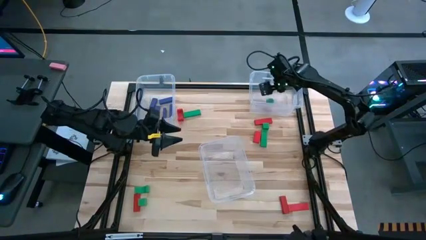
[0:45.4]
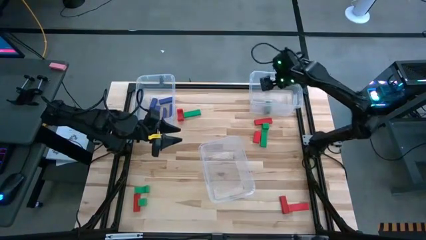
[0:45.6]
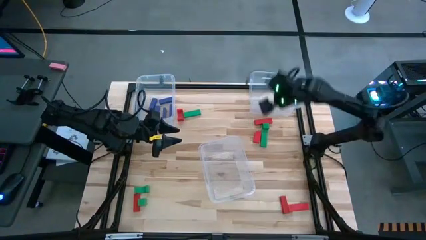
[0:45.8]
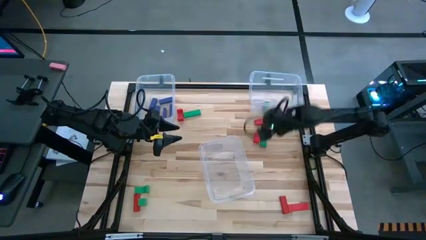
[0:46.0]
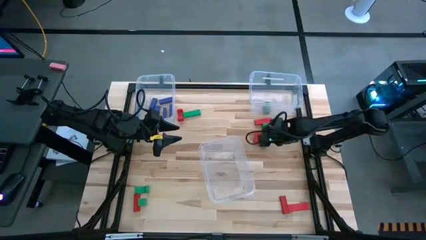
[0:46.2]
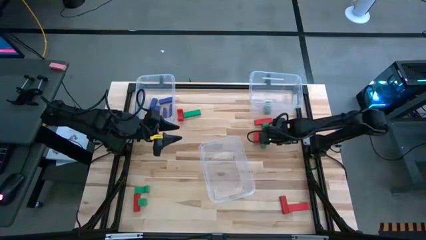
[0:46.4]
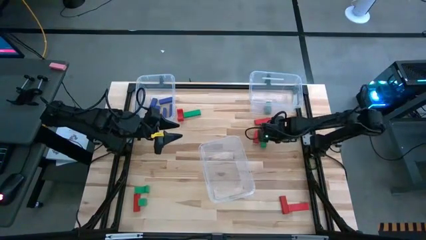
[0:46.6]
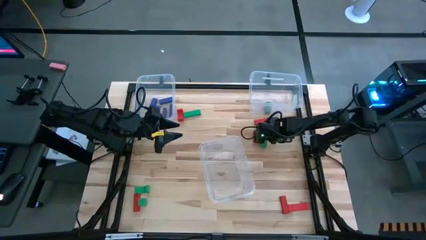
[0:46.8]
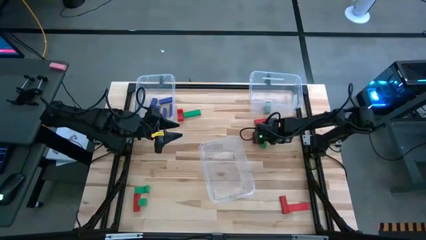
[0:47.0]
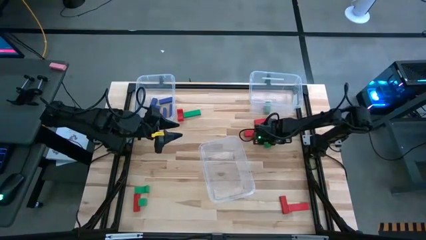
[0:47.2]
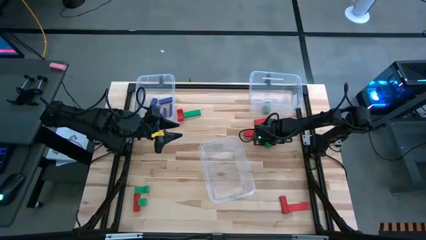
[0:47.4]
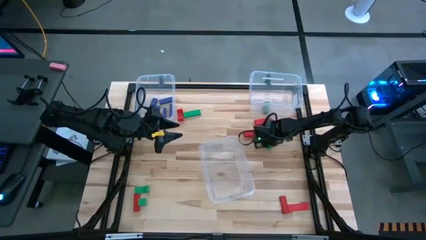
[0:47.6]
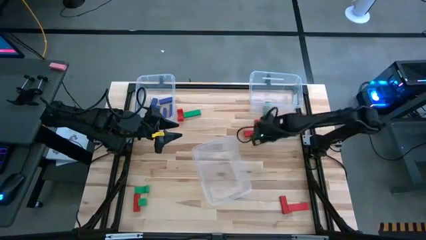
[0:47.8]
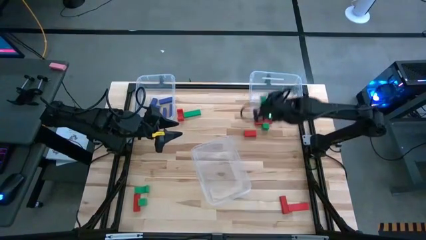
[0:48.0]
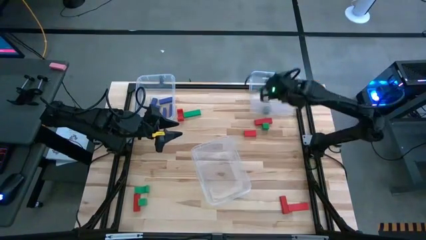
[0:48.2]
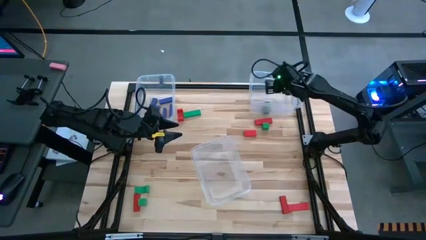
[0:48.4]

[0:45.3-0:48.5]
Task: Sort blocks
Put the green block into the top right transparent bin

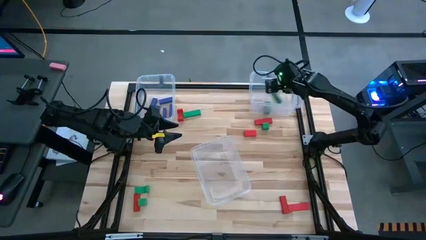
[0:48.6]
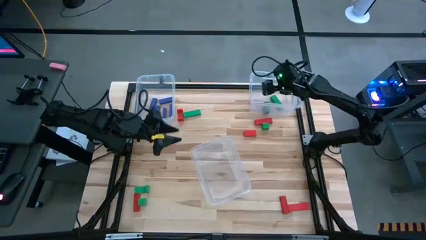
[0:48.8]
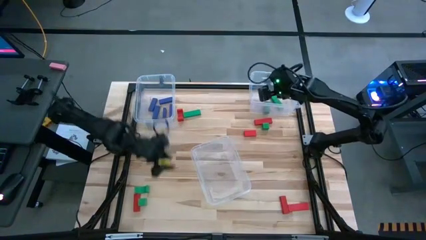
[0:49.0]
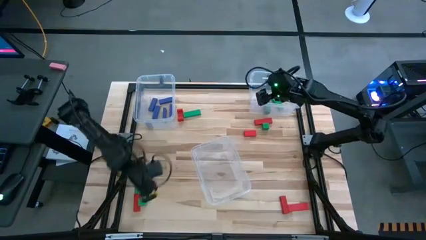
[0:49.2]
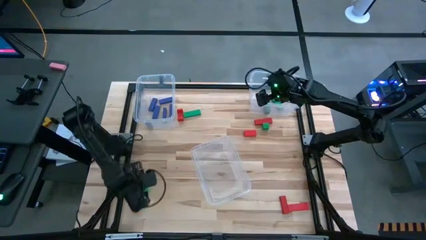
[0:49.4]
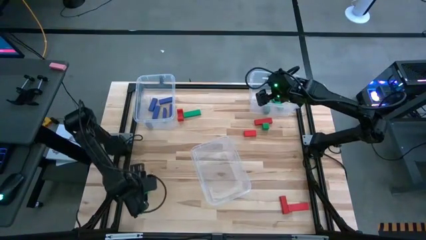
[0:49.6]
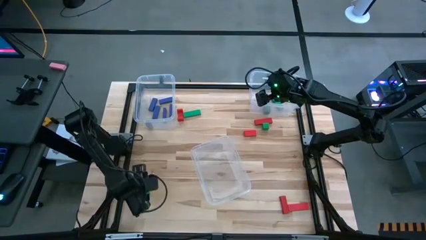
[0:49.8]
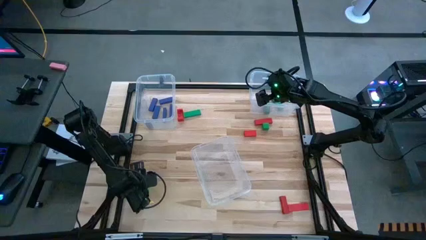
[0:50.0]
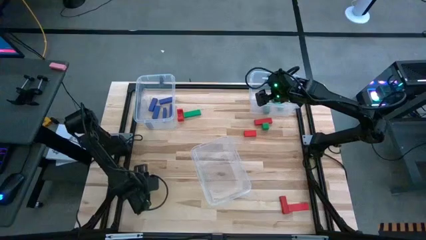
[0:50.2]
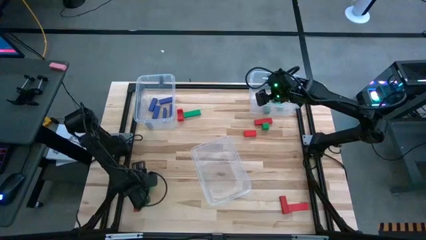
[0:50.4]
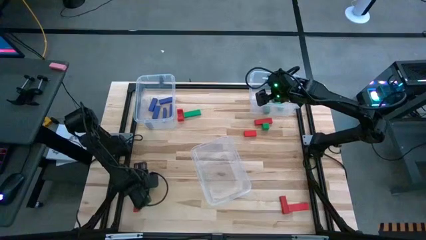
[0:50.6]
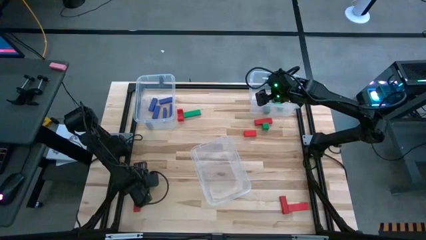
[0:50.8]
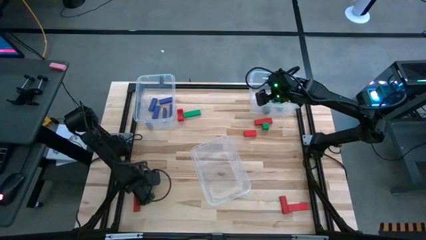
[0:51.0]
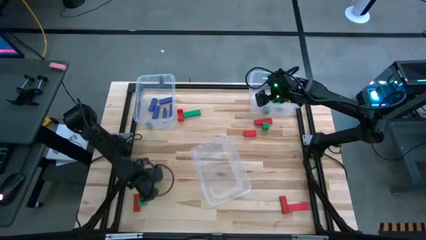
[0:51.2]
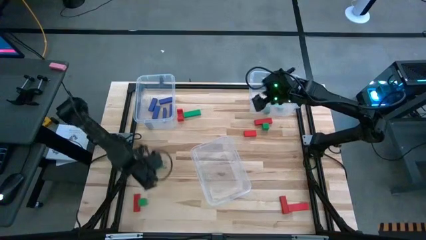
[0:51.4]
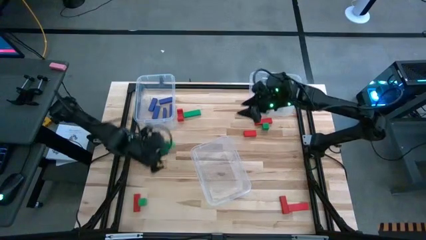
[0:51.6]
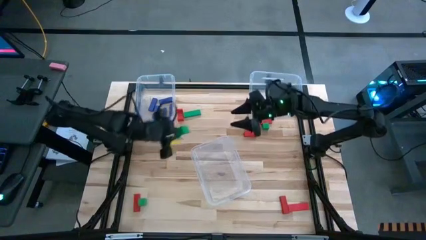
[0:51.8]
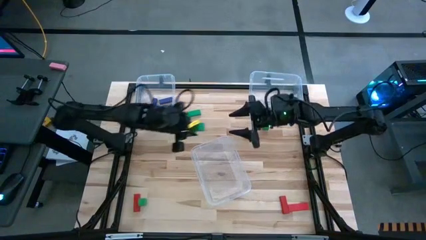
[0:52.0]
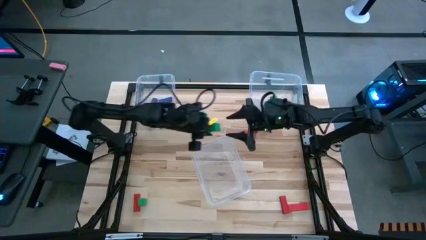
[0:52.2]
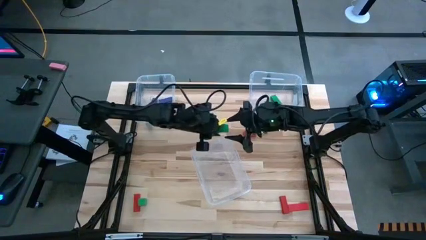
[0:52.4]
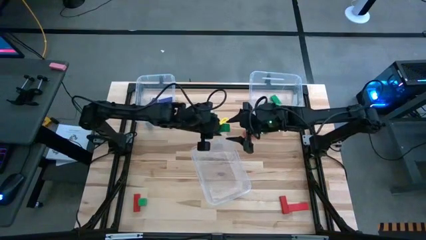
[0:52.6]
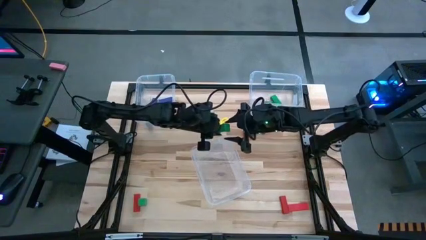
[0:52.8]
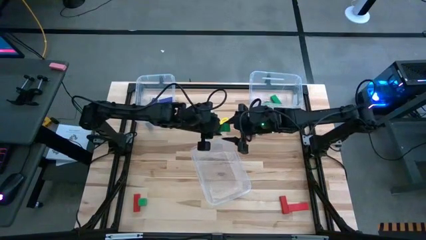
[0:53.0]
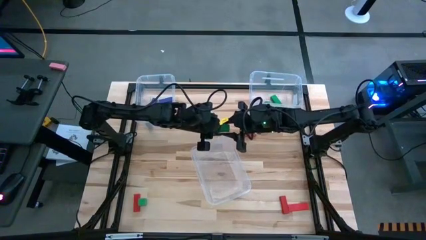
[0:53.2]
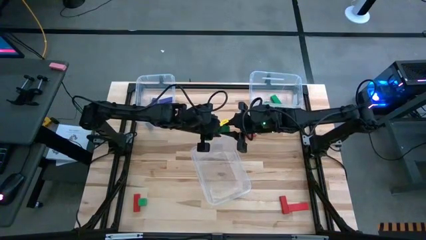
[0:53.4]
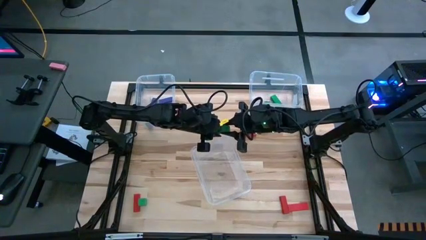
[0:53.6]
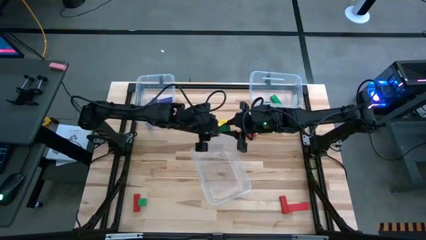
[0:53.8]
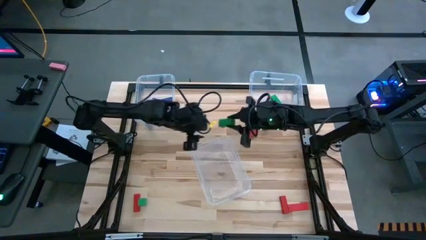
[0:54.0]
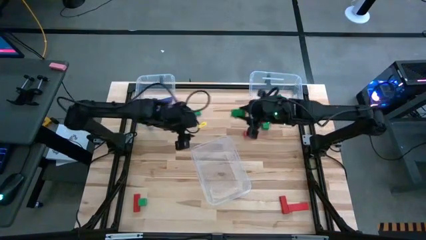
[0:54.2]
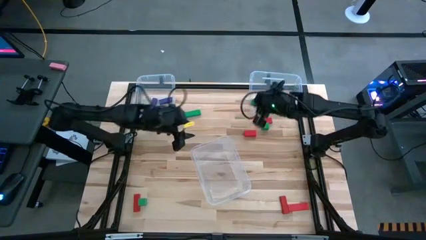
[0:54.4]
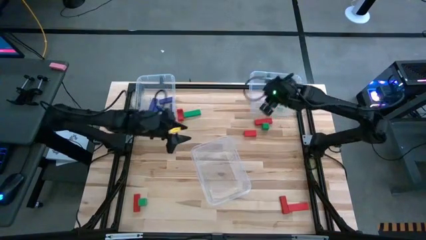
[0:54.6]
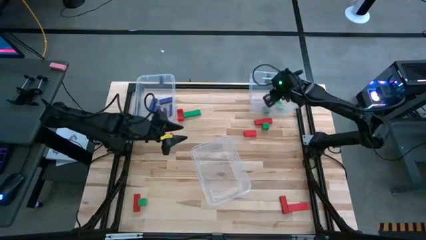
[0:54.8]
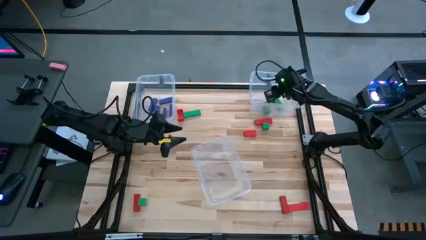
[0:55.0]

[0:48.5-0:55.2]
Put the green block into the top right transparent bin

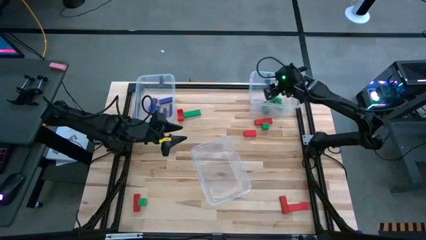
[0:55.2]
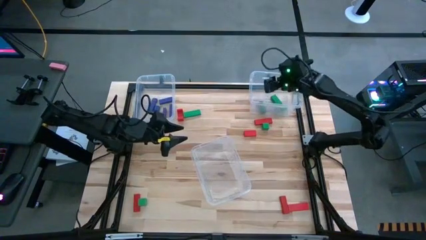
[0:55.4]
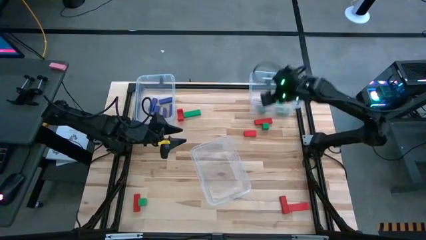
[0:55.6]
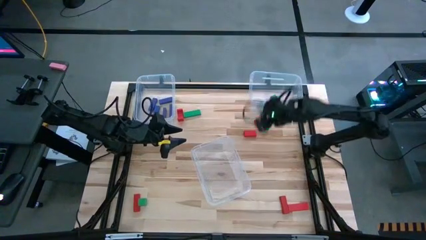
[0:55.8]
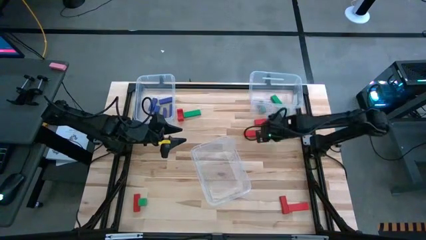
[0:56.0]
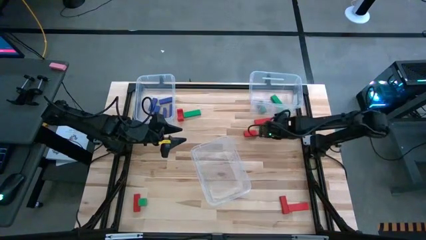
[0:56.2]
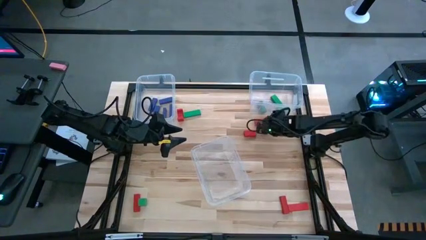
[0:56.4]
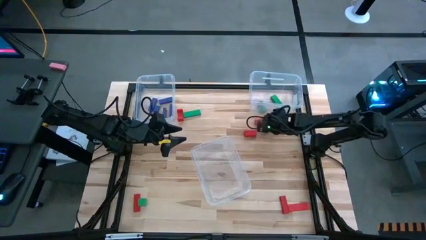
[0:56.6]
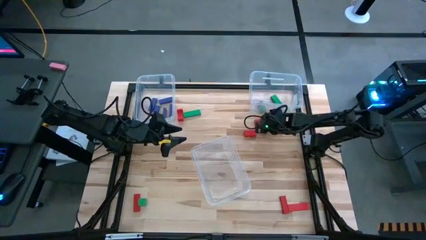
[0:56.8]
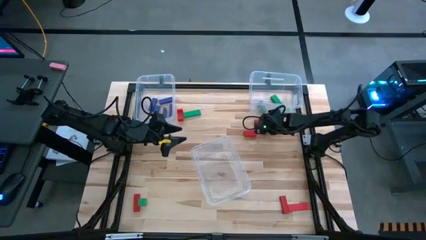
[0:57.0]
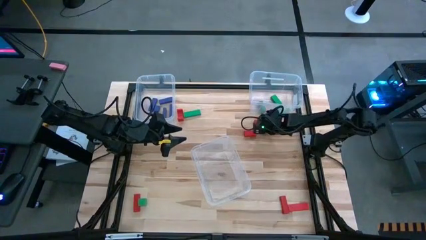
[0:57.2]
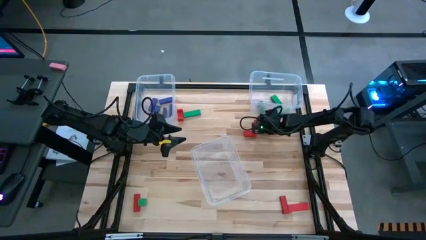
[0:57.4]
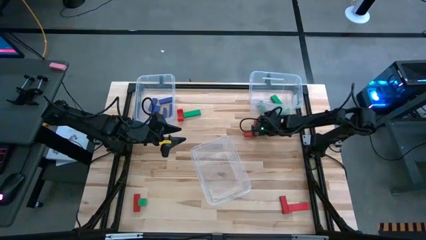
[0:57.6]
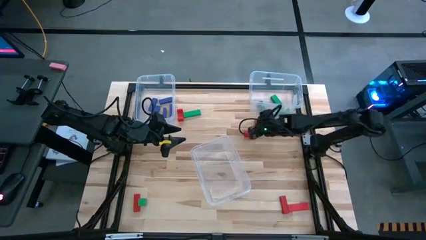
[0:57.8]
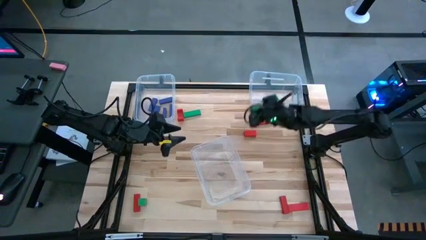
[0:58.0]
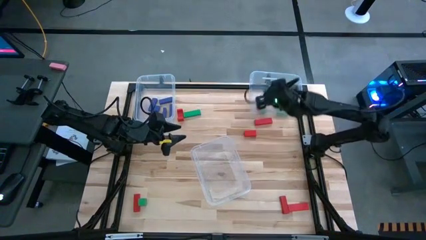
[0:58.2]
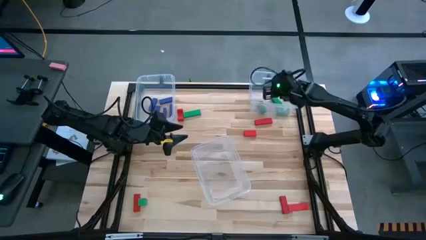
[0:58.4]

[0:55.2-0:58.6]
Put the green block into the top right transparent bin

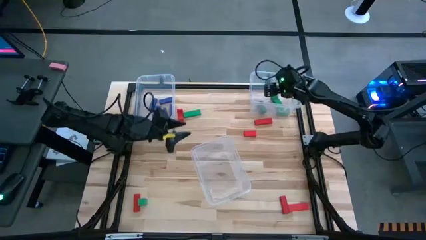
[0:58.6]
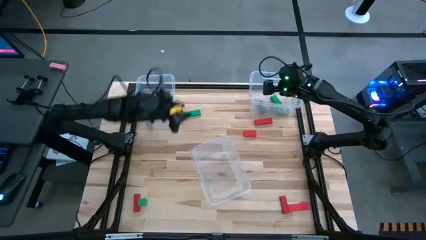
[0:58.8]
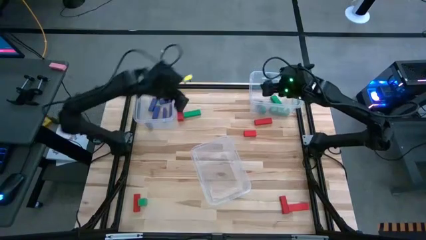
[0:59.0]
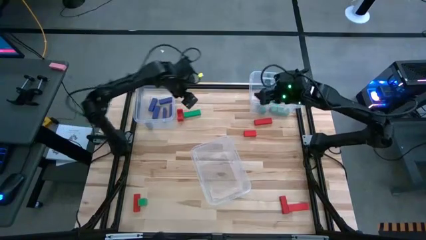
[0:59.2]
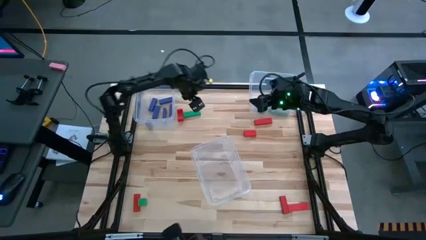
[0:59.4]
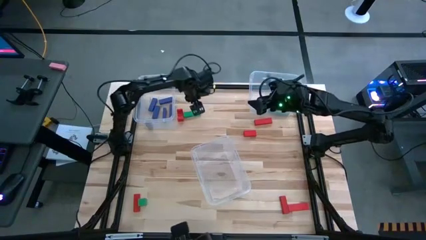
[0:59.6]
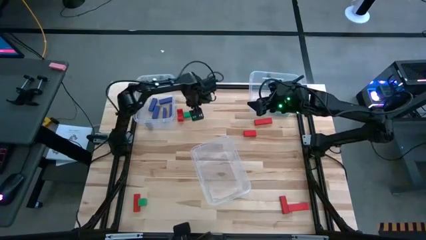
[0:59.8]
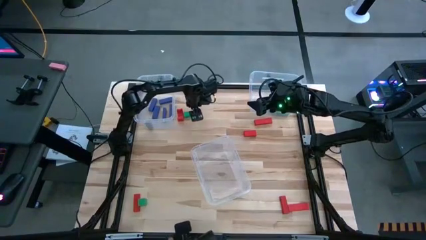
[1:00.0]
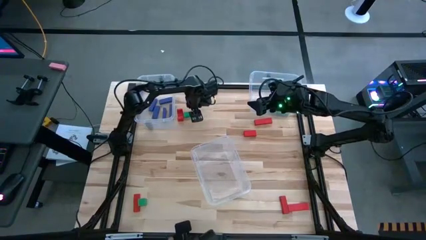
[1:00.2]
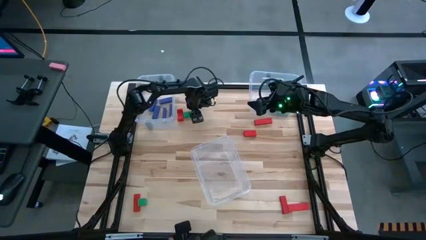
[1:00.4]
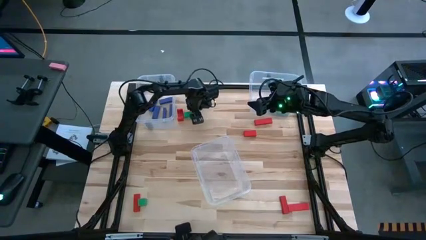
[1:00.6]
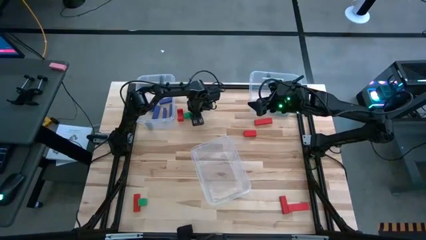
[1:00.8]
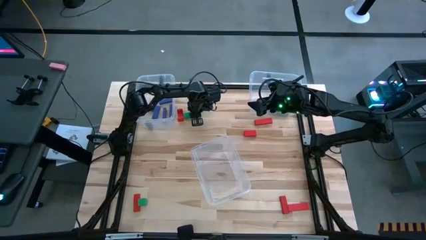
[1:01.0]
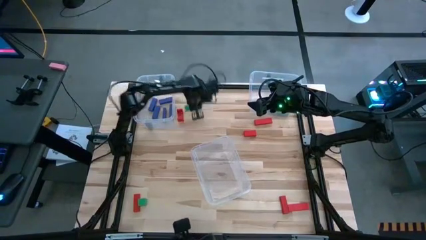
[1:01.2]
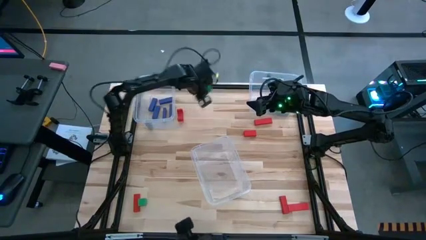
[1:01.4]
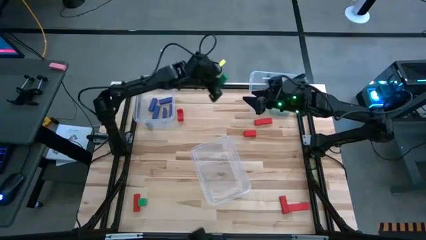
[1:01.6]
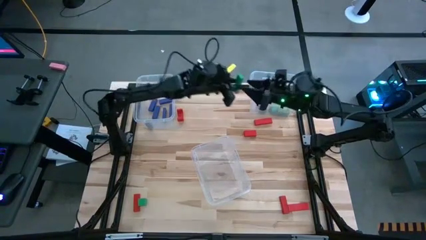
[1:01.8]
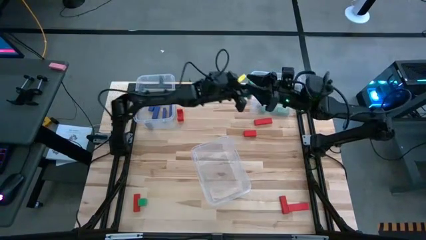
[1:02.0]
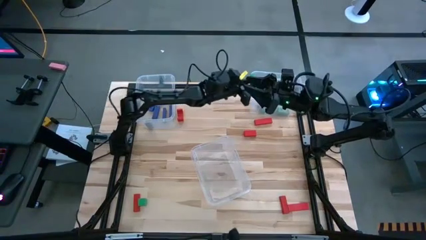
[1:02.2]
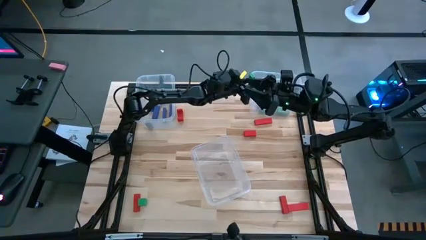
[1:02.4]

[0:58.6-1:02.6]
Put the green block into the top right transparent bin
